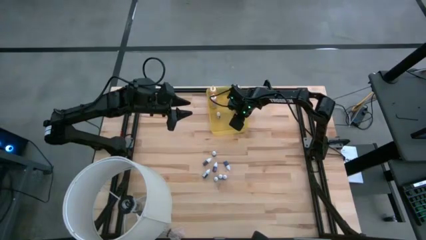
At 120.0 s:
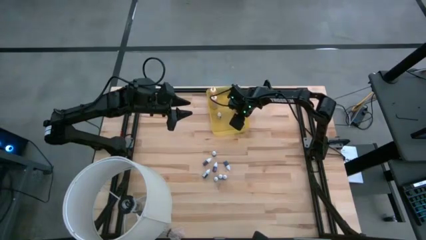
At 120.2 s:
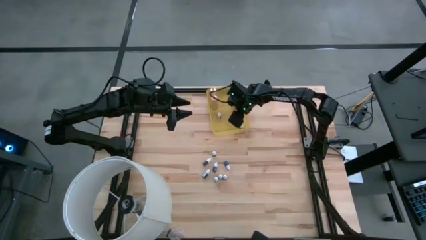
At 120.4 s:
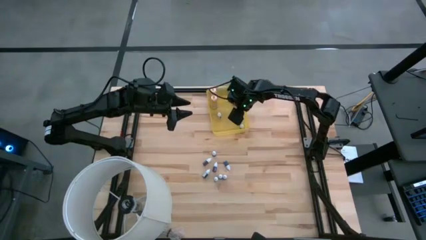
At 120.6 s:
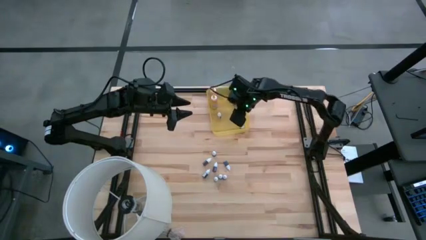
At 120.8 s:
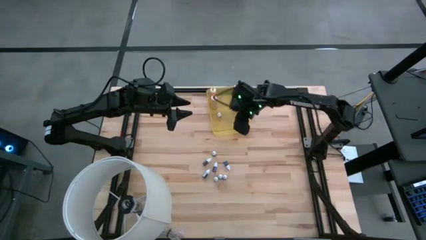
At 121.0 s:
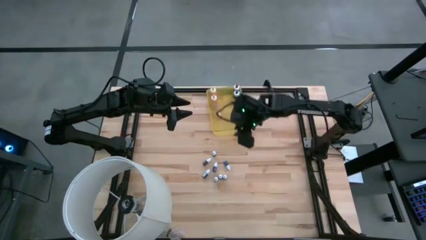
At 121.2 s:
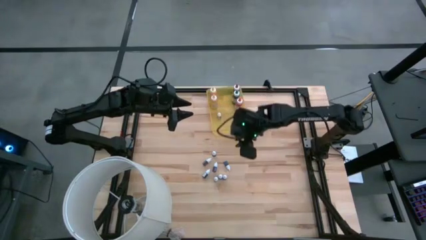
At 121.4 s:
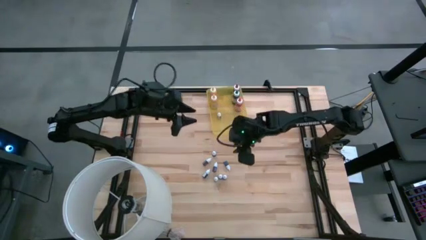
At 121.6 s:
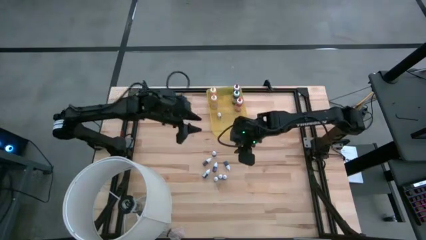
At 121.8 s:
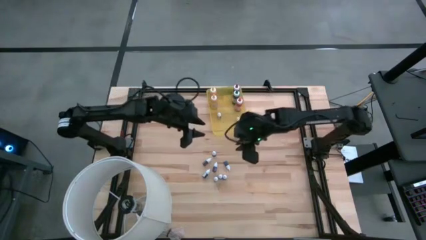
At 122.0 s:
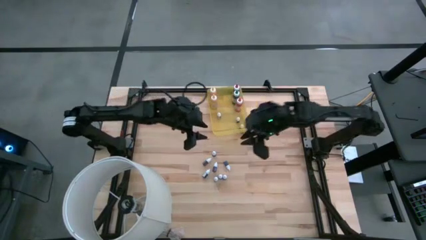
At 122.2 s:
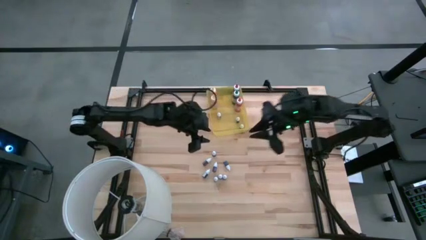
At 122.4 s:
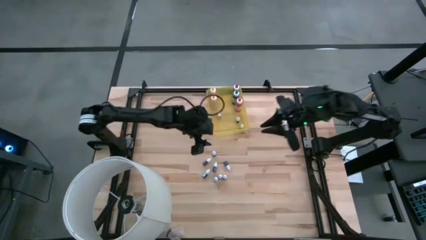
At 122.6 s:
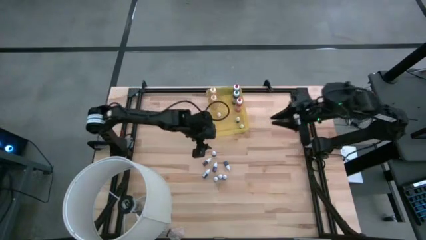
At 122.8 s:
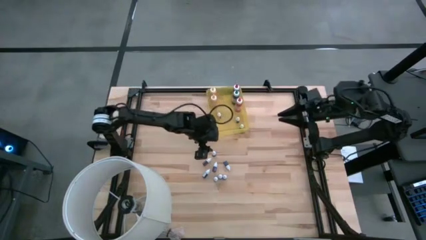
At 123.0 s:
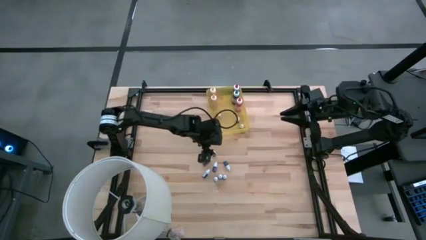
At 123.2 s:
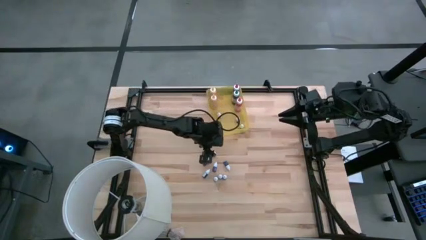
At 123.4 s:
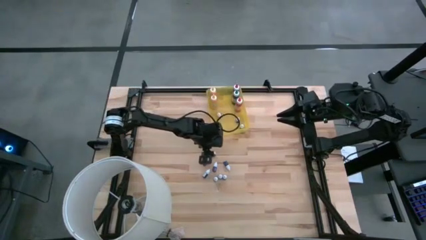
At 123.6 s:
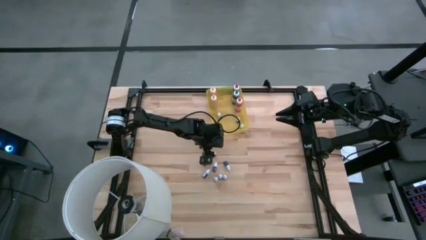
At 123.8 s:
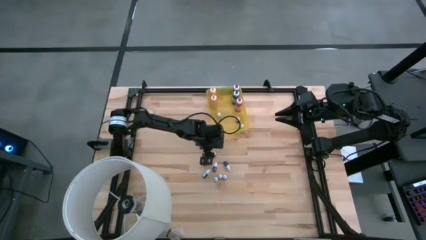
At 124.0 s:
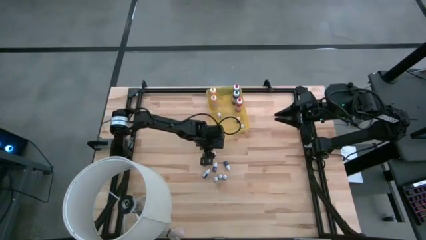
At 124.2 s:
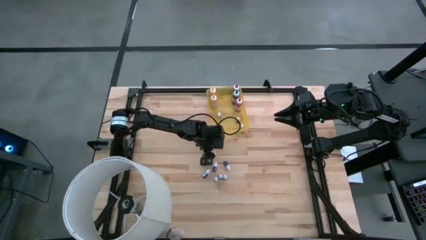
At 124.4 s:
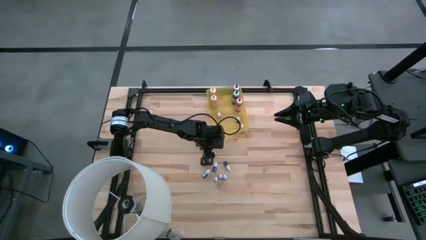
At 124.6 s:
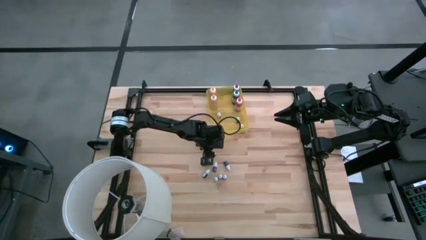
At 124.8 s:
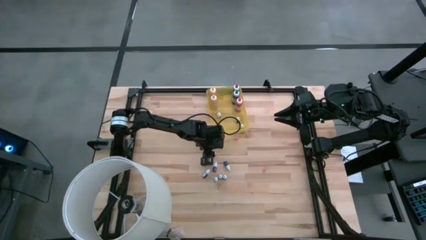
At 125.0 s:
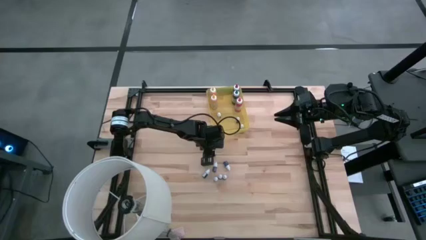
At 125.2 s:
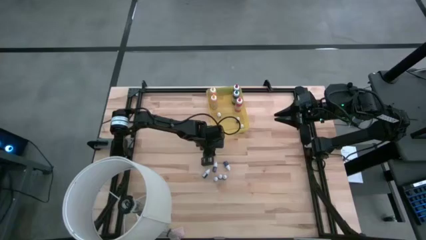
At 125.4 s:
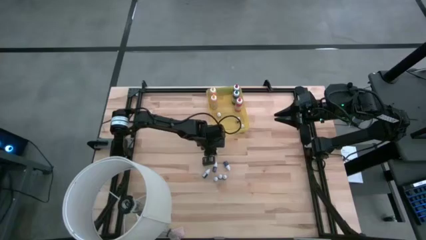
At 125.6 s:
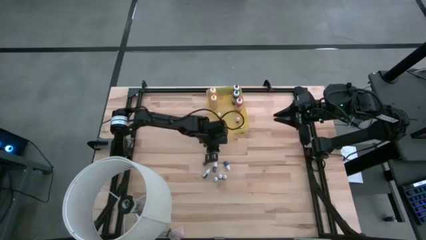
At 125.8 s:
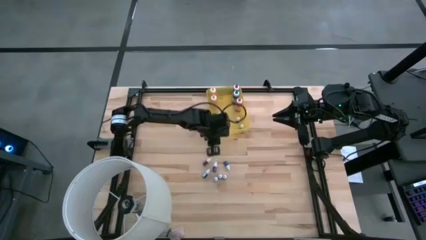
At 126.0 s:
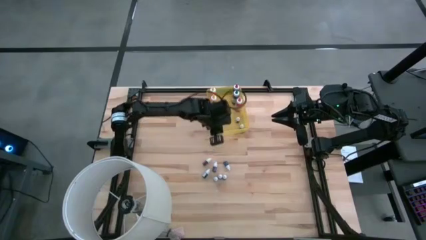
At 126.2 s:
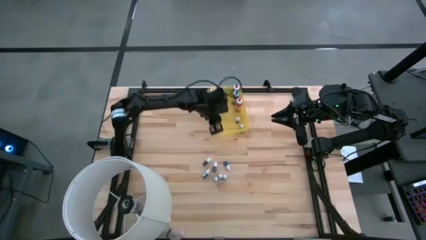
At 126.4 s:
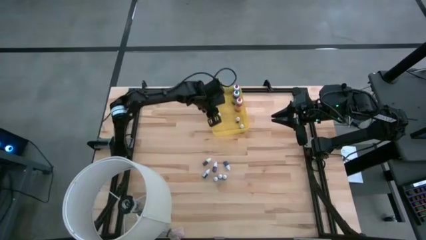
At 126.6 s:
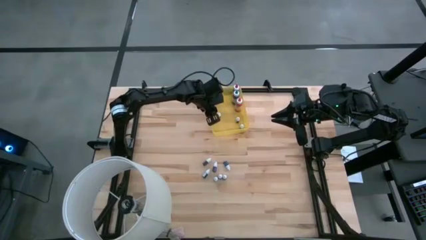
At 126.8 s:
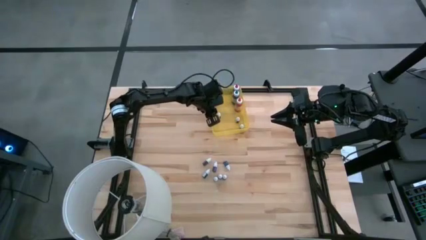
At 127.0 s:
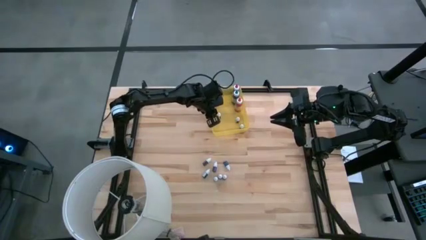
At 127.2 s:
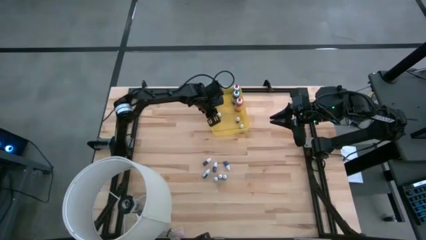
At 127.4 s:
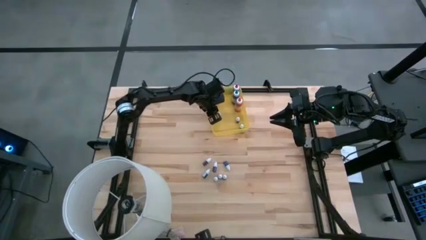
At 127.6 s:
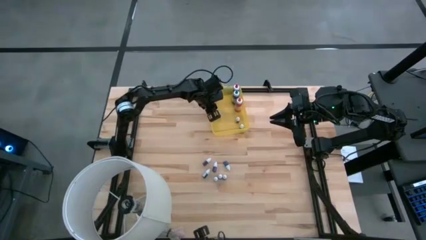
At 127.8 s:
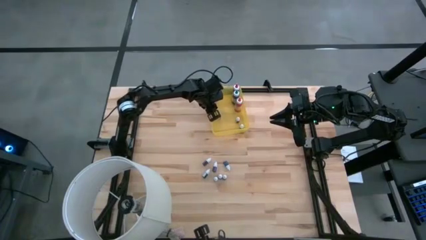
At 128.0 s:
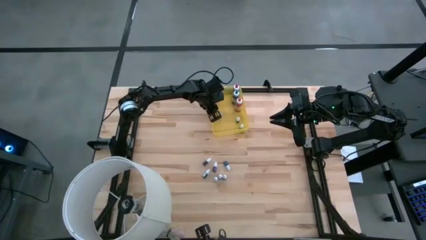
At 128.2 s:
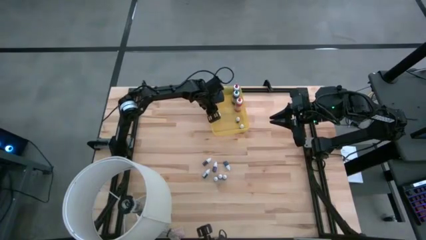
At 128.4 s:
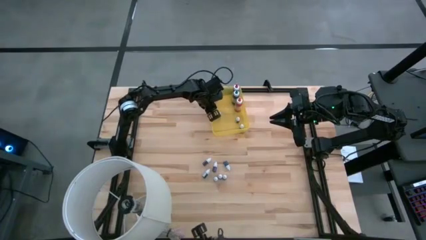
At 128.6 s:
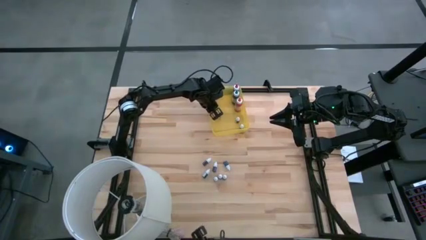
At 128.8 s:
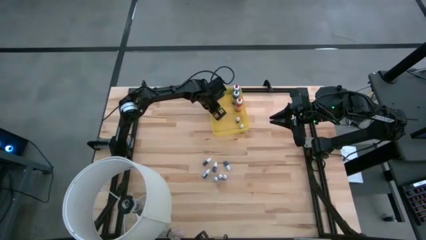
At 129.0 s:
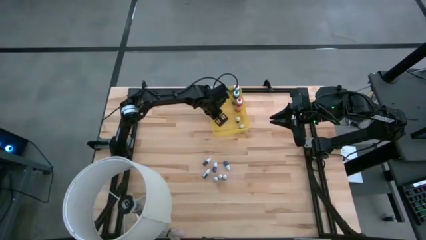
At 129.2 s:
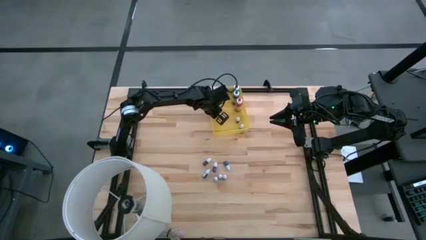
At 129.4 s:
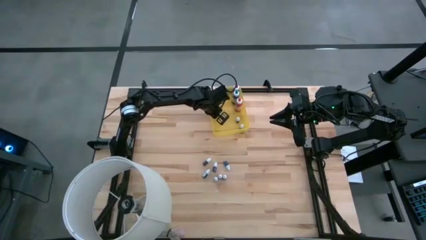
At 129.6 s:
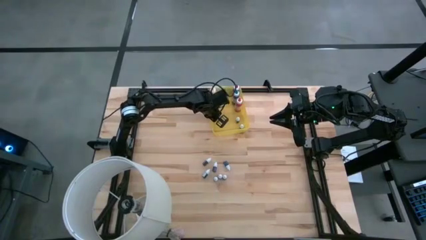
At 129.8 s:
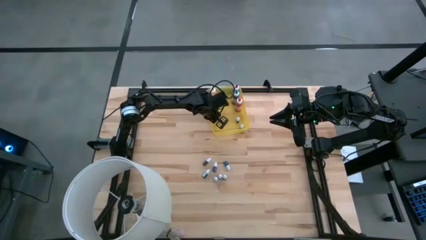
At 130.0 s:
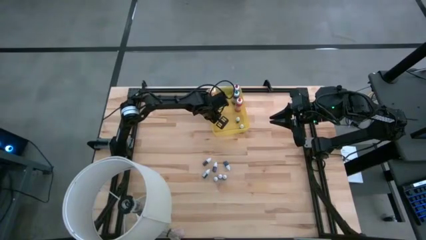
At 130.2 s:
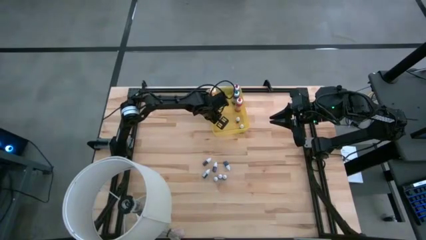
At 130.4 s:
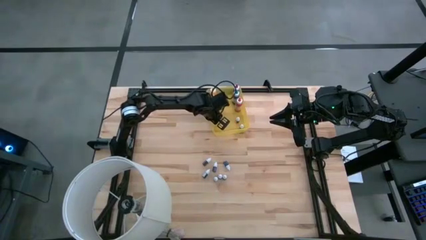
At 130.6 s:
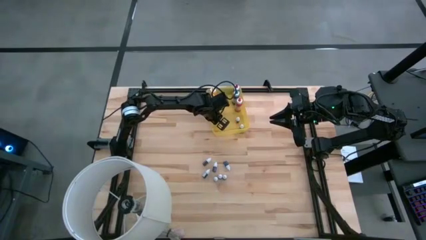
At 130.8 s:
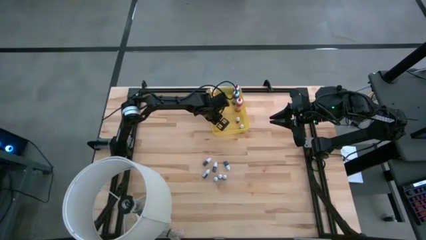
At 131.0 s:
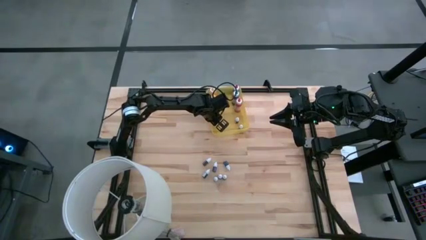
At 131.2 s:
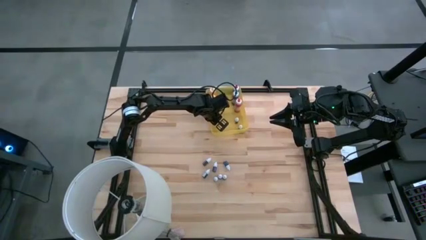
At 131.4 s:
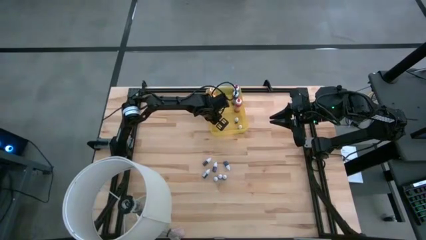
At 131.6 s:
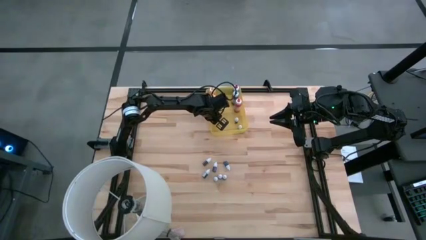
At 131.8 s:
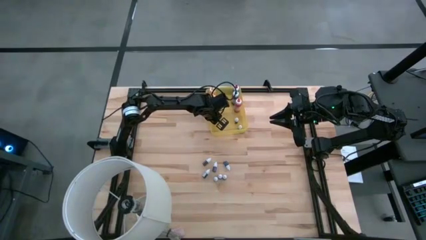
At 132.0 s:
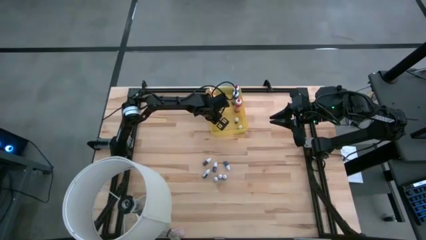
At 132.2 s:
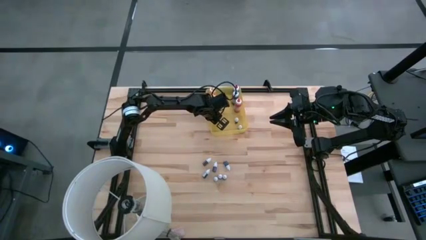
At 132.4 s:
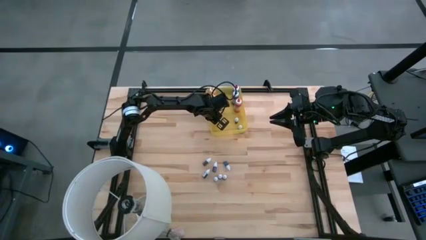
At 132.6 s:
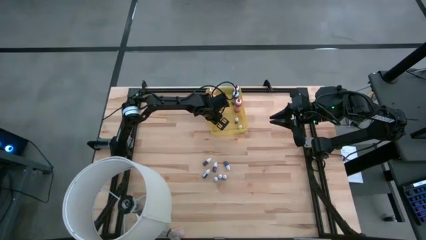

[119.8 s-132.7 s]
Task: Pick & Place food coloring
Put the top small green food coloring bottle into the yellow bin

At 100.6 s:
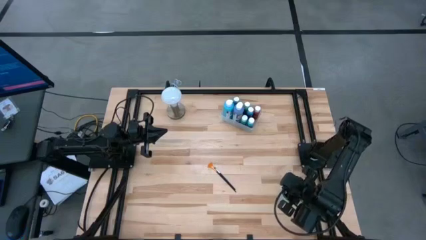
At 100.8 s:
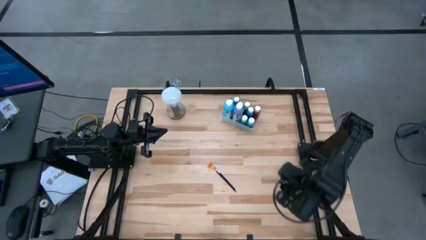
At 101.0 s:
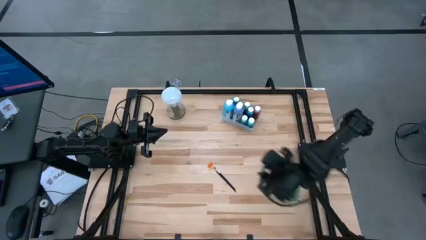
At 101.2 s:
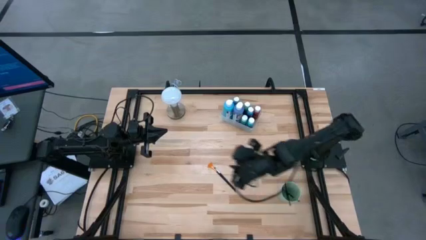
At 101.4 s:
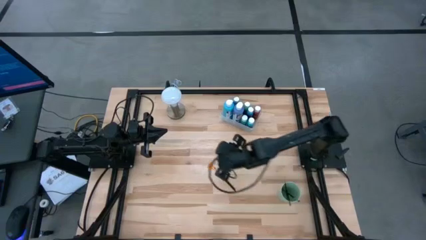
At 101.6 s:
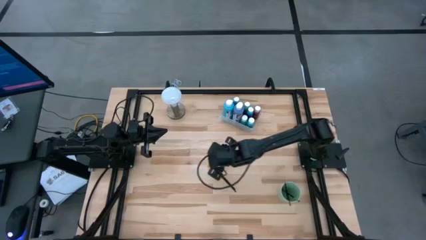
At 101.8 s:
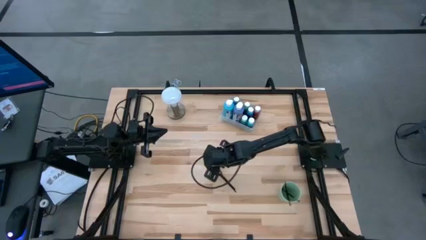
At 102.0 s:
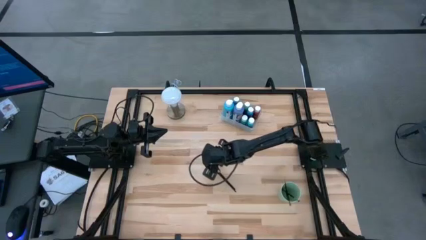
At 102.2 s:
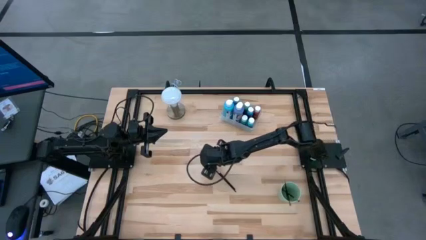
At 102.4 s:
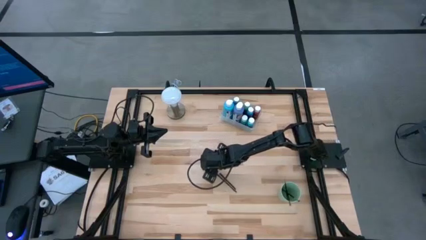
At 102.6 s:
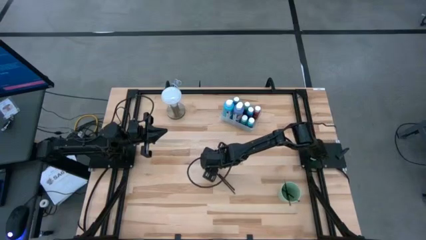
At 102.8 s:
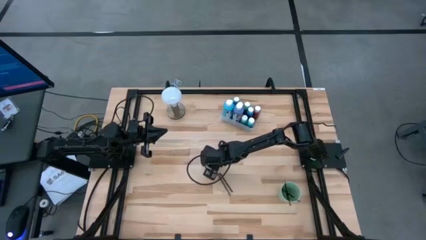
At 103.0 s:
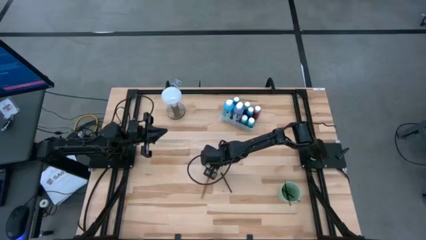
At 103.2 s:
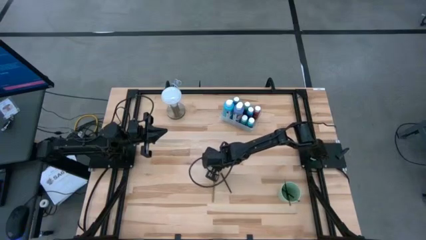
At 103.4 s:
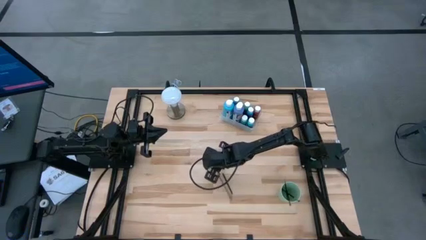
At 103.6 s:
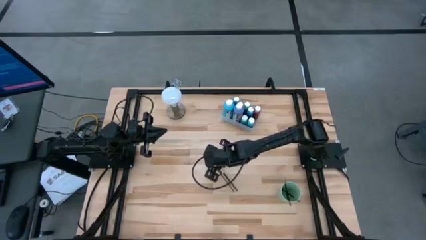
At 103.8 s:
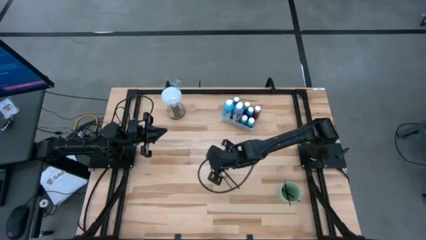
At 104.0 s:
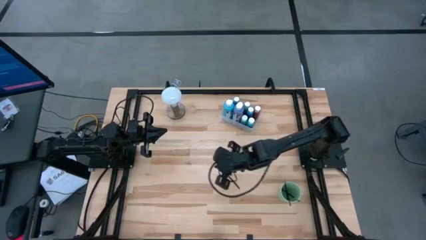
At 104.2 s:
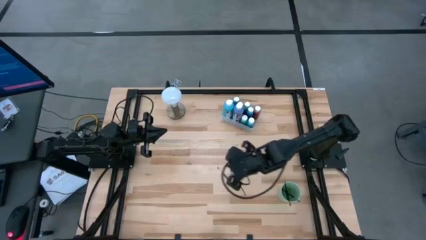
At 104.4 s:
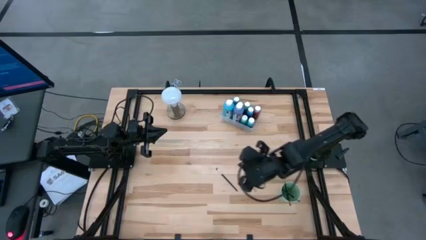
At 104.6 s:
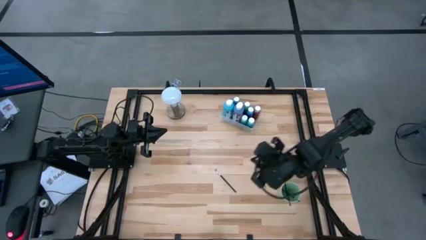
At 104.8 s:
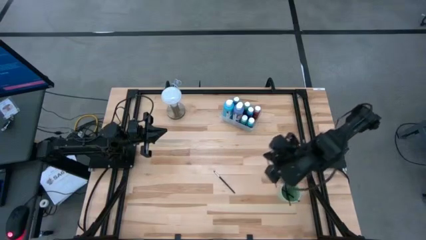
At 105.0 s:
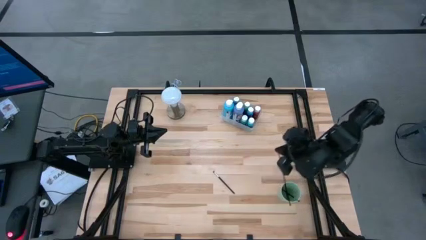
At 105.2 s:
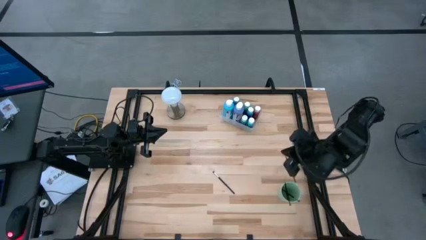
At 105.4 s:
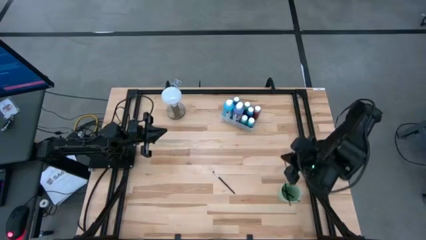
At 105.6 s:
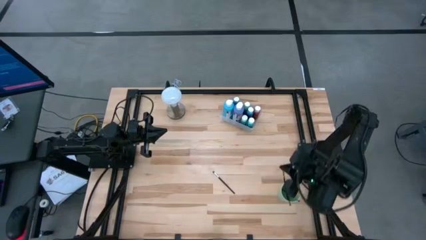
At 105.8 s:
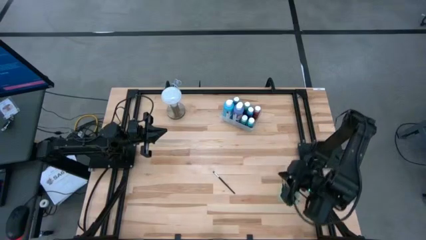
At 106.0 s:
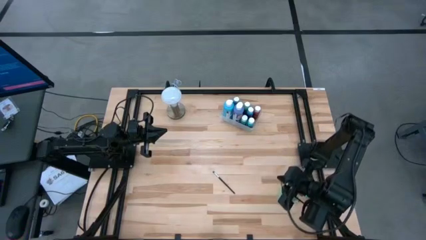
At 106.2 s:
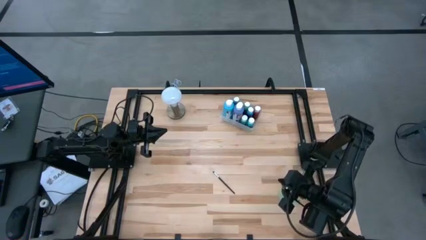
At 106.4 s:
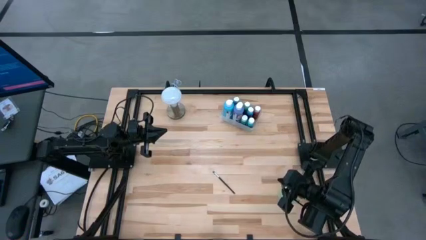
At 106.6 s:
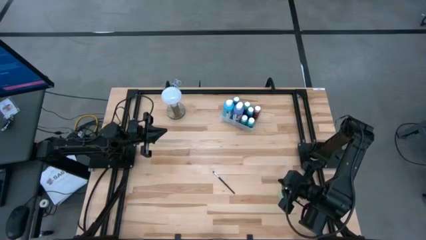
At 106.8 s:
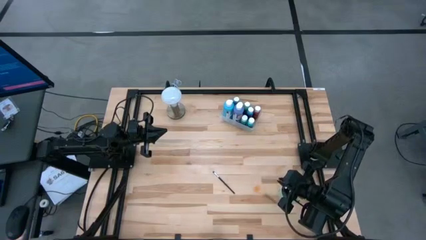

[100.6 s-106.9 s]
Task: Pick & Place Paint Supplies
Put the highlighter brush into the green cup
